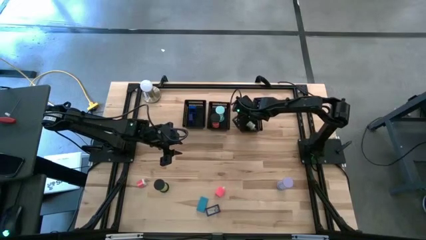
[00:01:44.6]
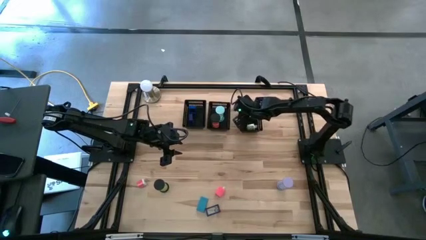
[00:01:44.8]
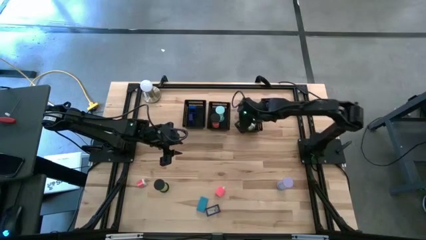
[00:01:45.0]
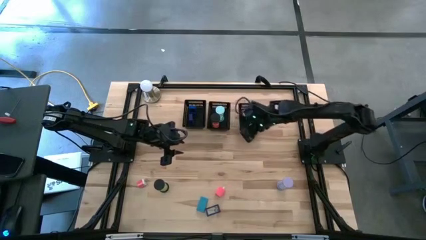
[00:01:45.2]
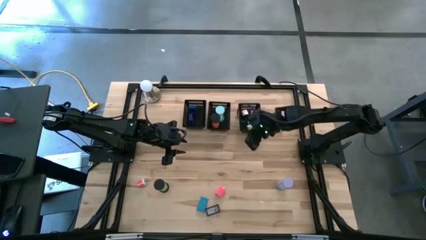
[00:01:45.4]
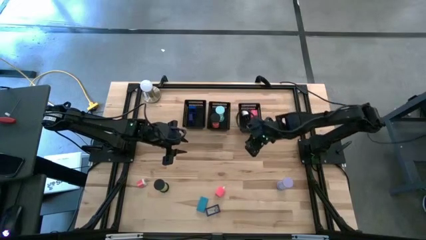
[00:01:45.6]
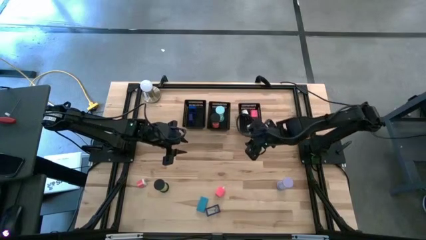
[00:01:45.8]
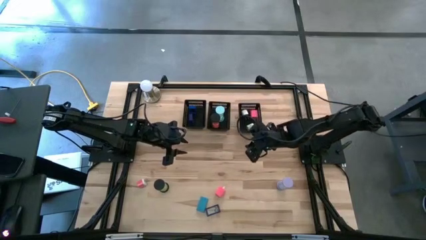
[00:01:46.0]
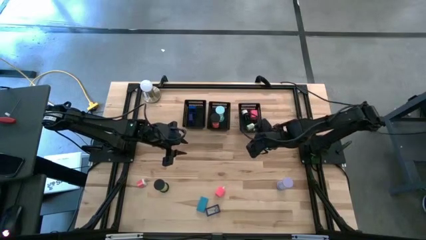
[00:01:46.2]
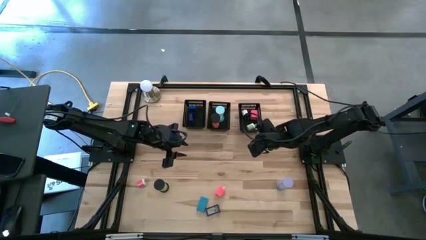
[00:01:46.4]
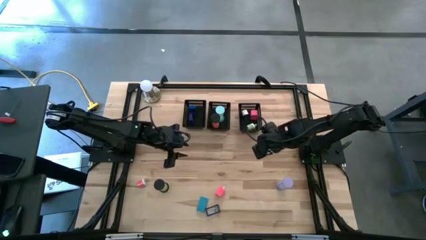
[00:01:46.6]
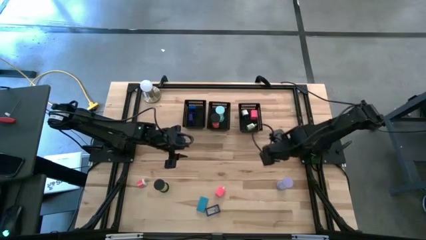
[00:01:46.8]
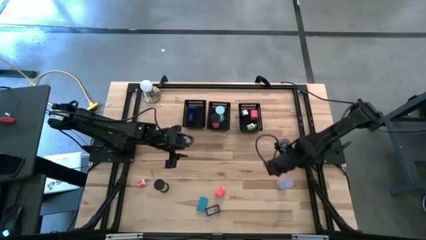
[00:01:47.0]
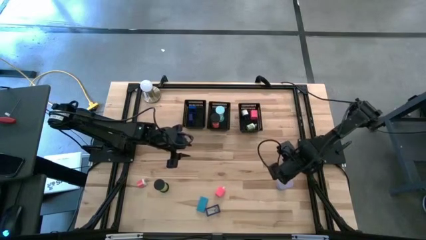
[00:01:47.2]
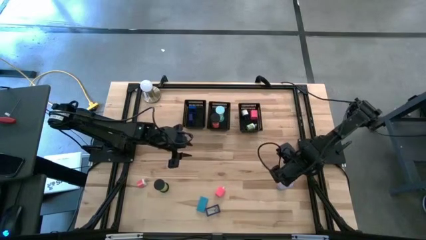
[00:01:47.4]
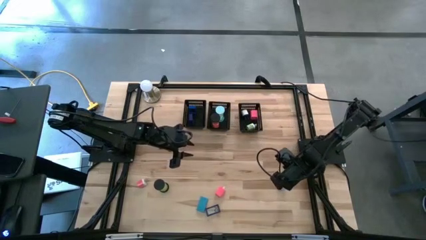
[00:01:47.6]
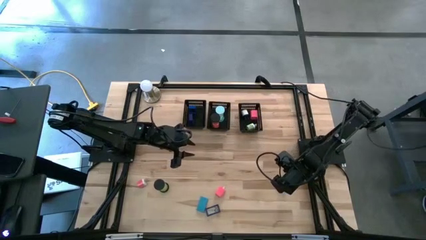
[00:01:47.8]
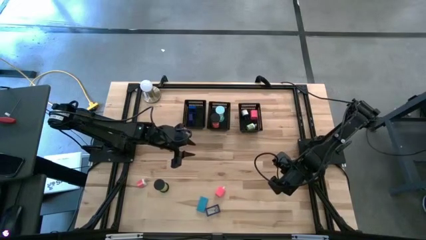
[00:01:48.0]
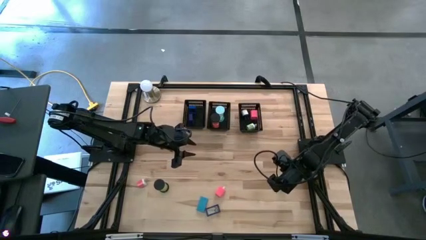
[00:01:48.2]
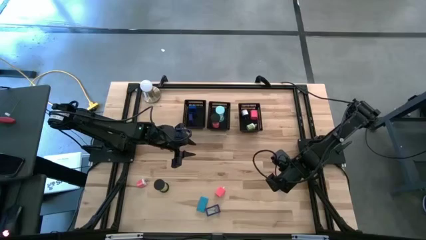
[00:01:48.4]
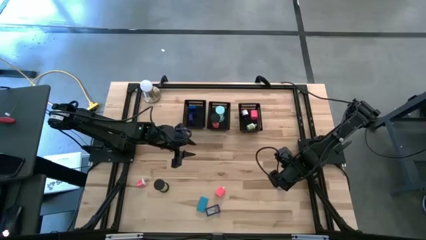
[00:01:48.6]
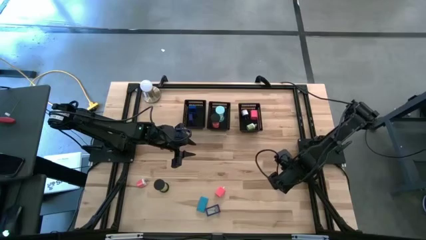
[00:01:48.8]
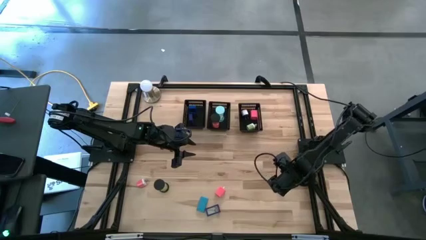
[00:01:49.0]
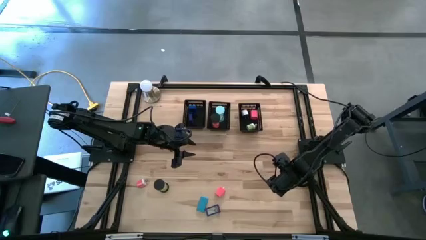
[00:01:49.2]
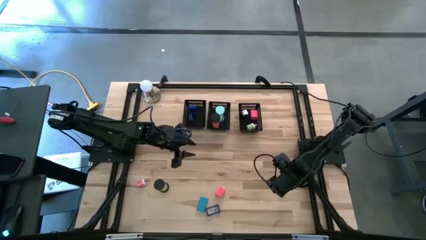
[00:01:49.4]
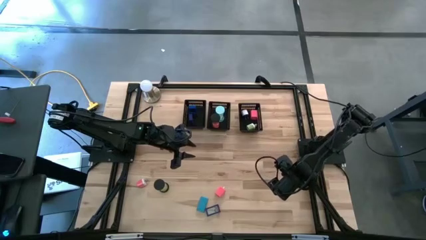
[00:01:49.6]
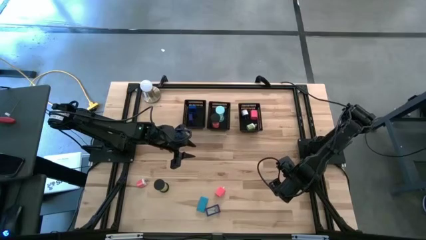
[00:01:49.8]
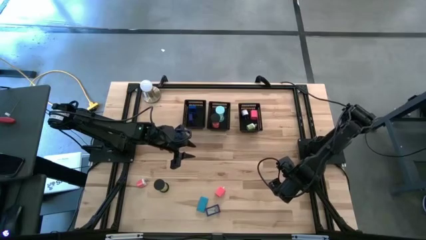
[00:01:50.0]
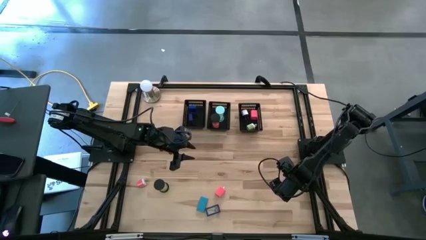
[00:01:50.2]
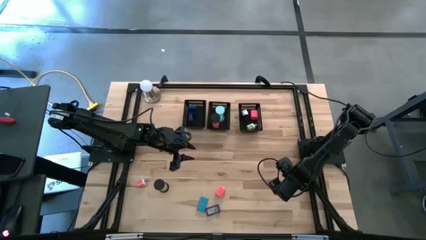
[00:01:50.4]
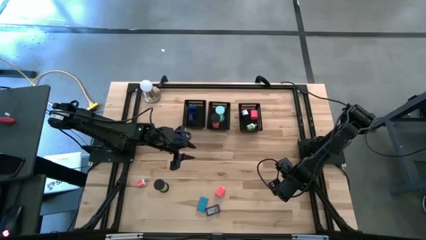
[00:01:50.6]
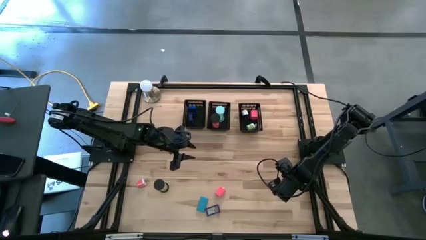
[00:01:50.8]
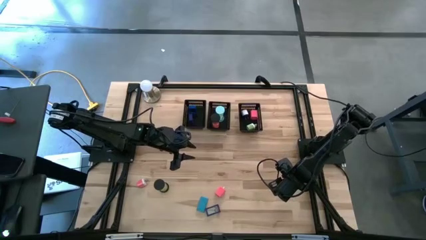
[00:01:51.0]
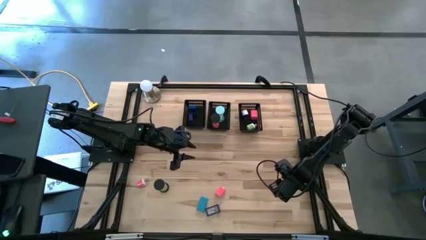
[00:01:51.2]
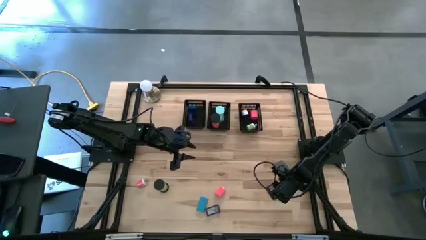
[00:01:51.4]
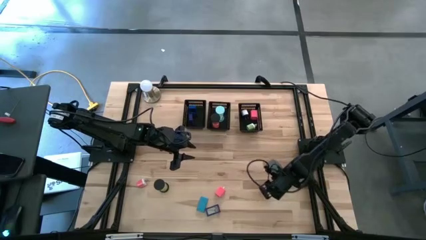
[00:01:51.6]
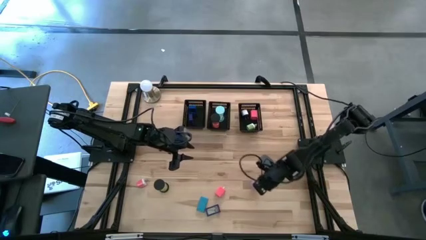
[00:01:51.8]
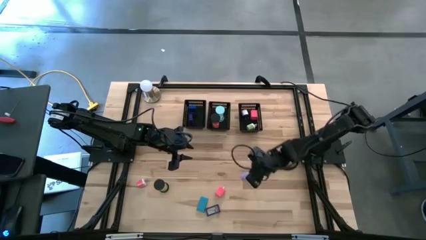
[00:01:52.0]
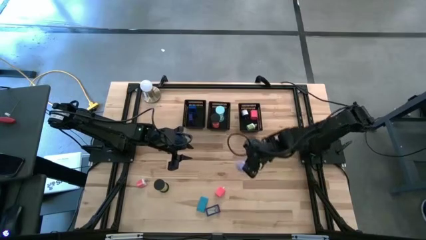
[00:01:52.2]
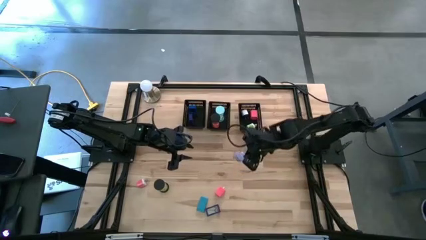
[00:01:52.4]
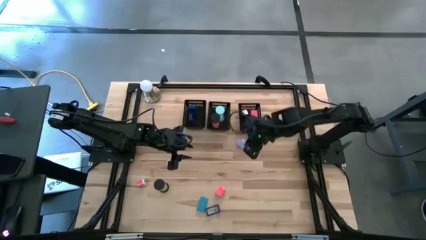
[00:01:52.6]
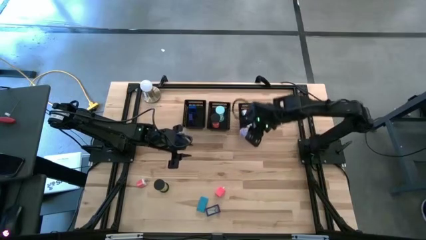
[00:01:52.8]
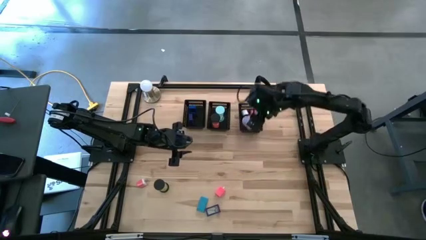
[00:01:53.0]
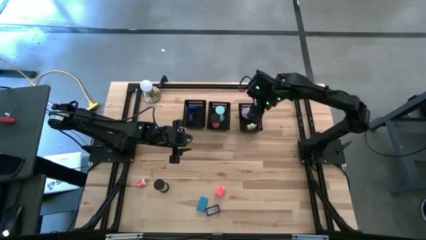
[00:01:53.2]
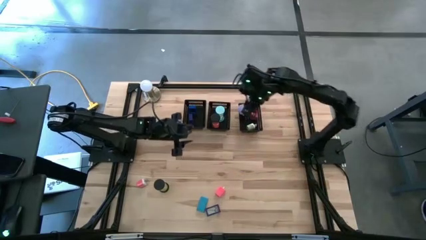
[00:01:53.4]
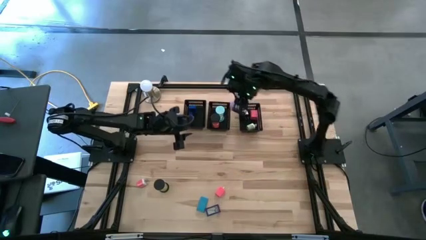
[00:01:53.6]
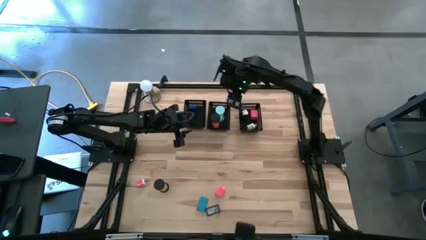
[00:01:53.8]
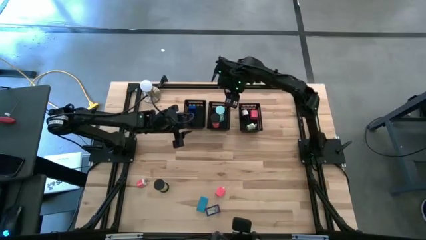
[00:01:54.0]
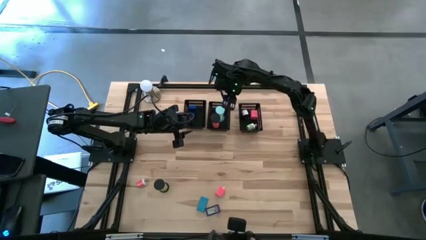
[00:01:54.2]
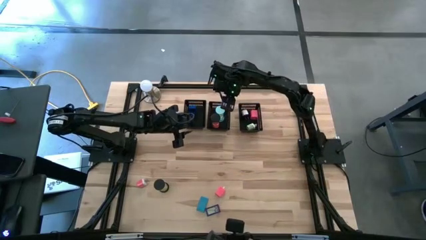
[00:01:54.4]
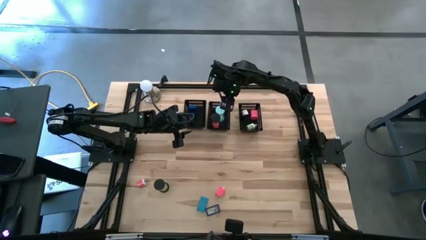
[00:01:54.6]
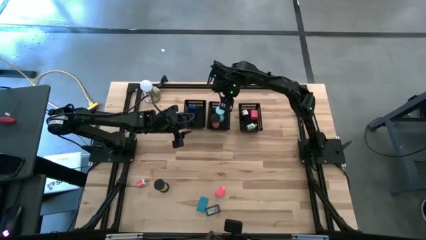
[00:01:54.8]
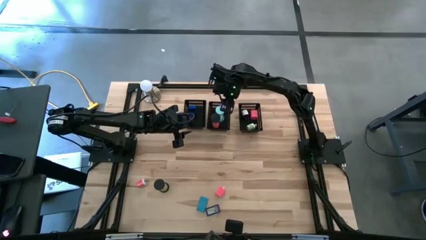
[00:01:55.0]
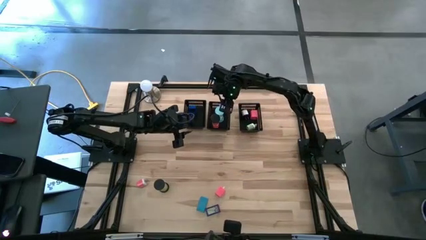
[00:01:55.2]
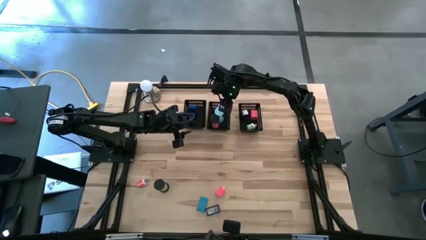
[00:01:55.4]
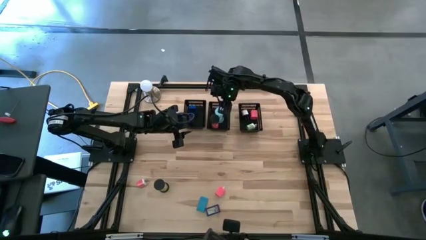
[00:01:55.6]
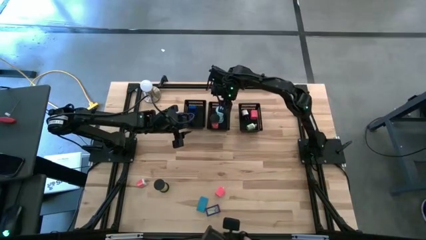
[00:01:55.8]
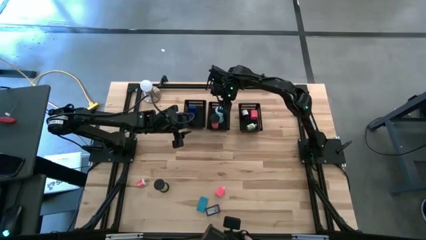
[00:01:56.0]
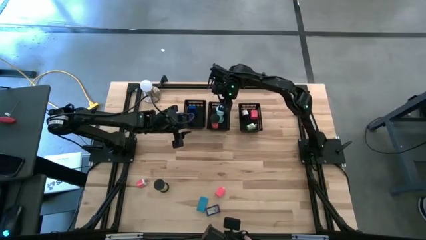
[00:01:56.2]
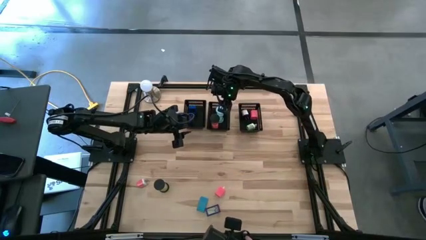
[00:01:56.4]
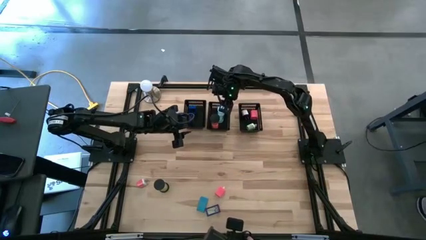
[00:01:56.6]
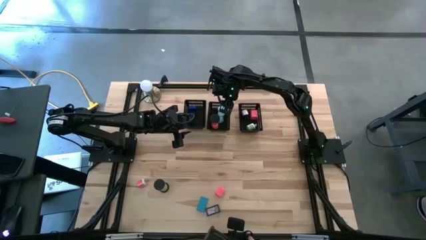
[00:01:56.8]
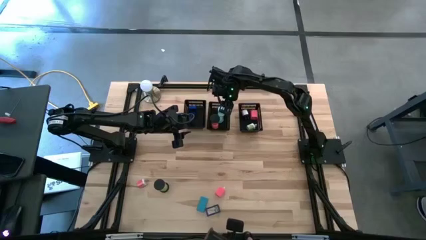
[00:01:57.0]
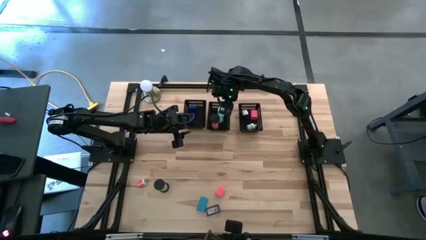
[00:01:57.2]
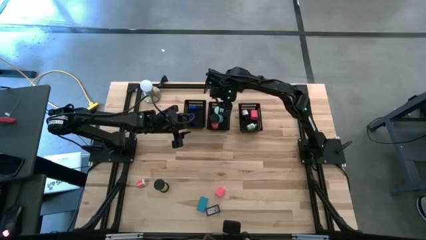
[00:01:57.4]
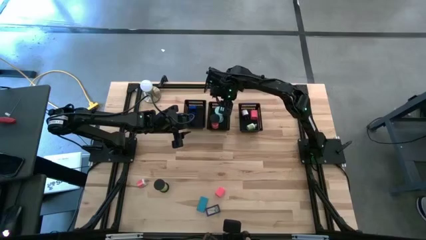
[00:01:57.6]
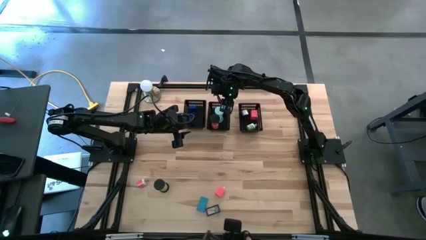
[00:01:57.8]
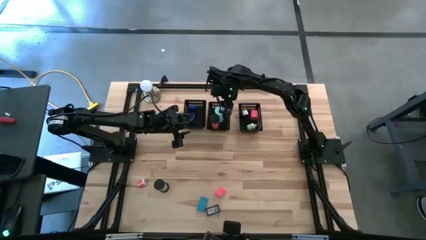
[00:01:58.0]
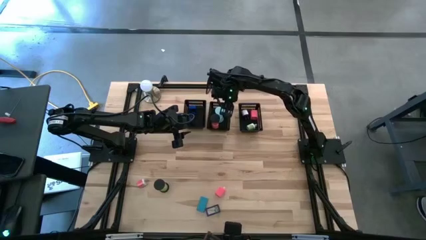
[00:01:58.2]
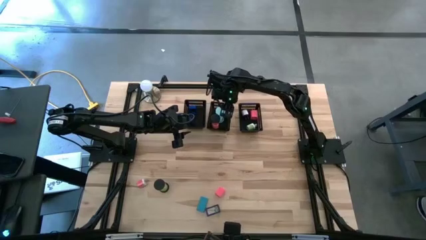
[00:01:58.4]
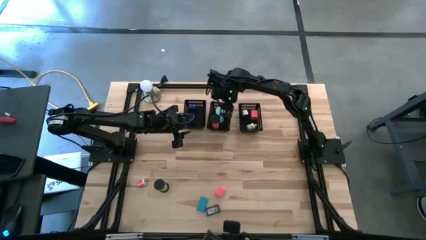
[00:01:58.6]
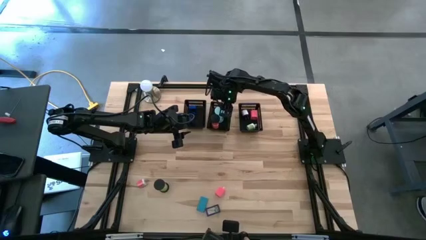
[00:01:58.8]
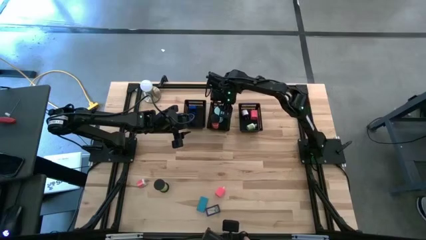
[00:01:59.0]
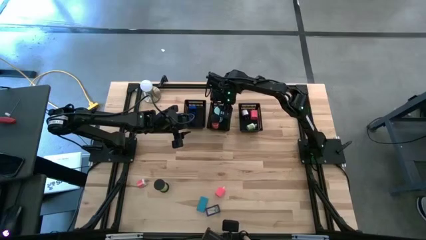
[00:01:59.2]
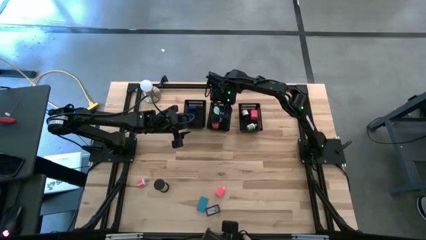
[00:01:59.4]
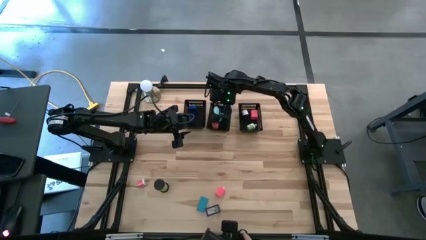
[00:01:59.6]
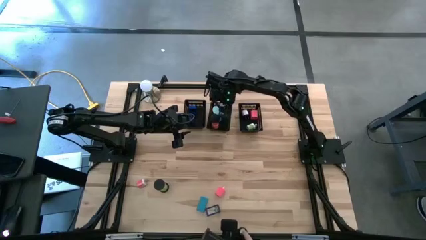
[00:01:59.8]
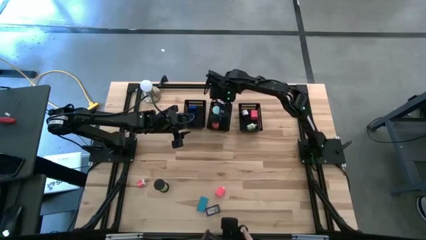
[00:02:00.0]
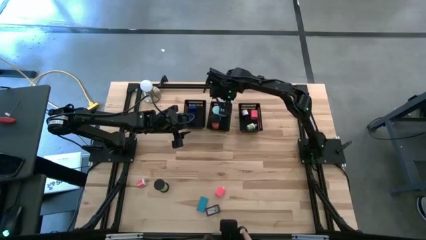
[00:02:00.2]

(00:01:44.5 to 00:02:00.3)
Task: Pick & Place Office items
Put the light purple hourglass into the middle black bin
